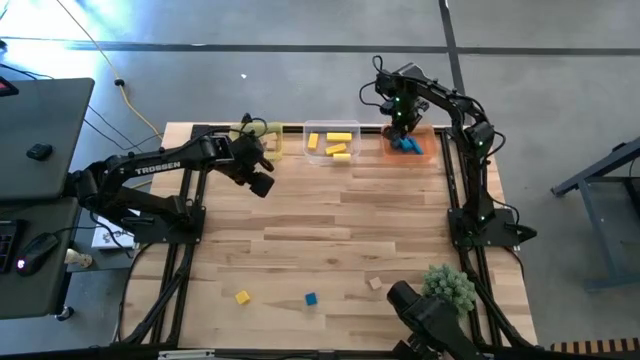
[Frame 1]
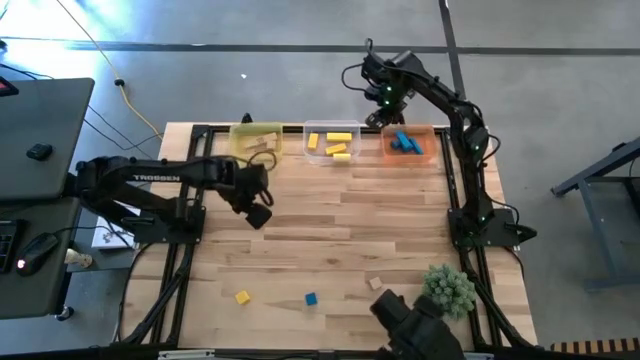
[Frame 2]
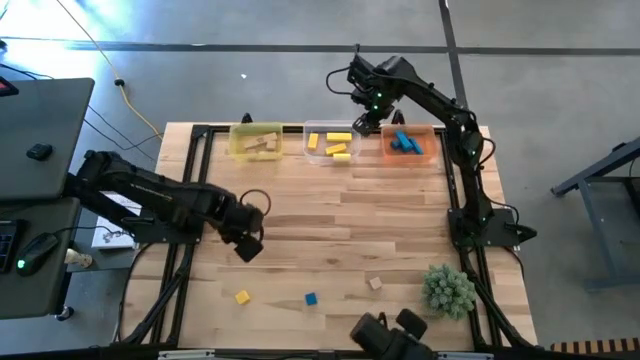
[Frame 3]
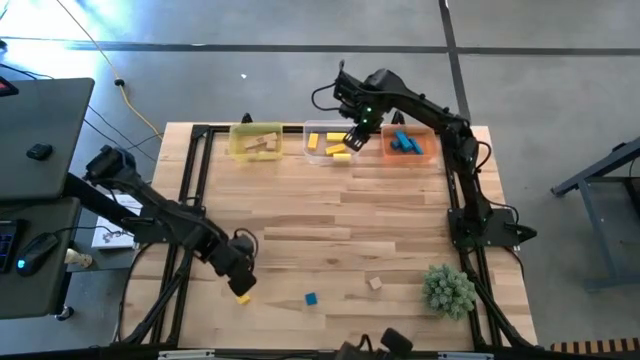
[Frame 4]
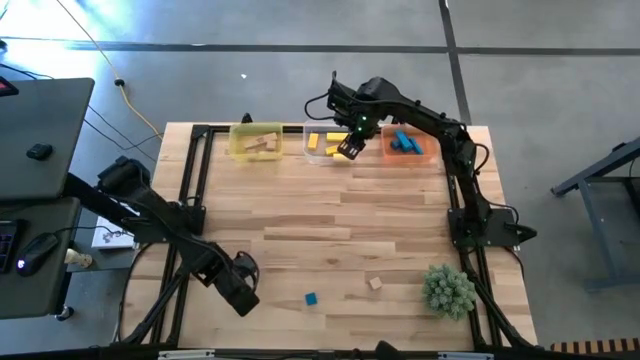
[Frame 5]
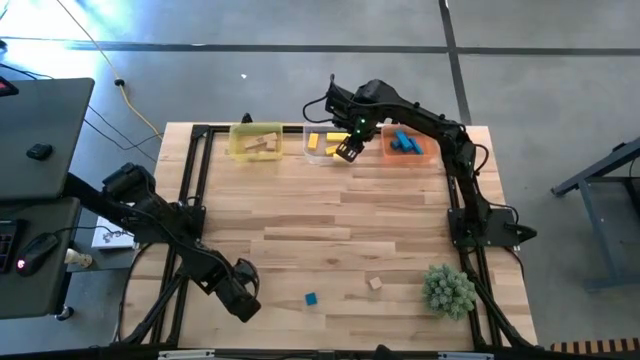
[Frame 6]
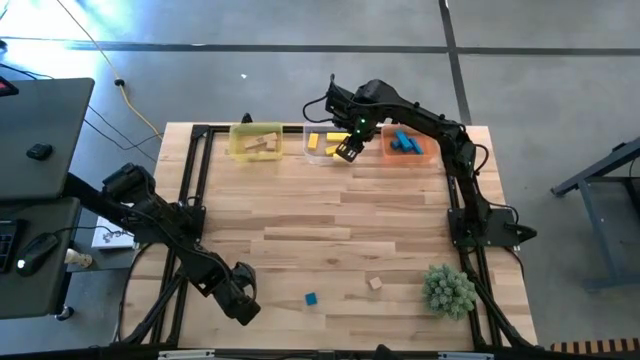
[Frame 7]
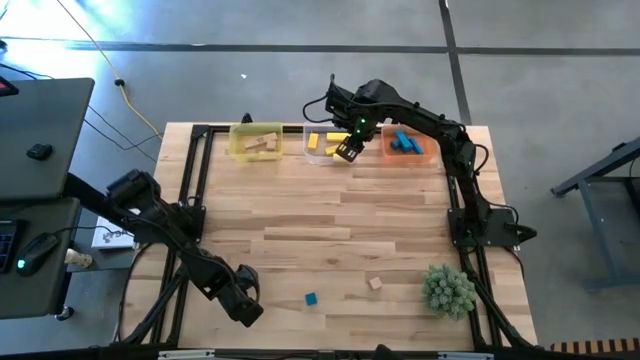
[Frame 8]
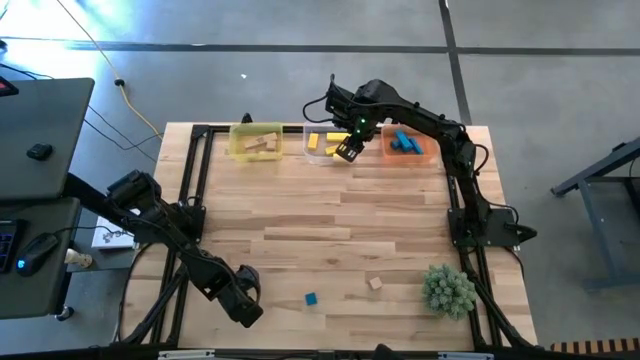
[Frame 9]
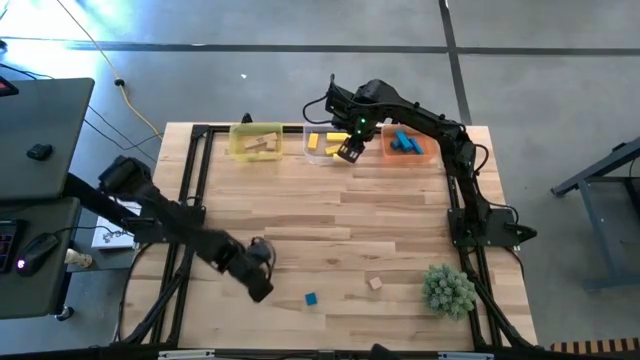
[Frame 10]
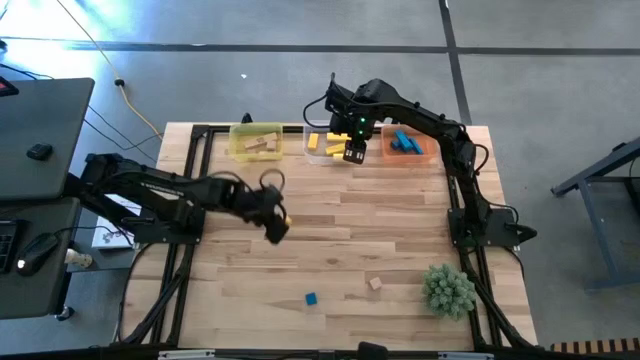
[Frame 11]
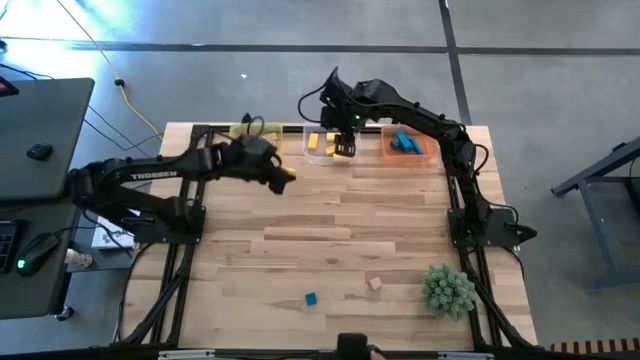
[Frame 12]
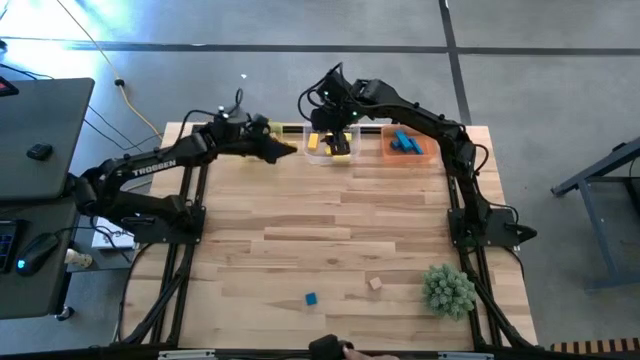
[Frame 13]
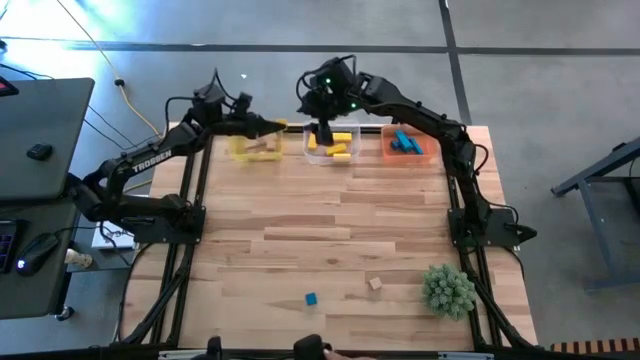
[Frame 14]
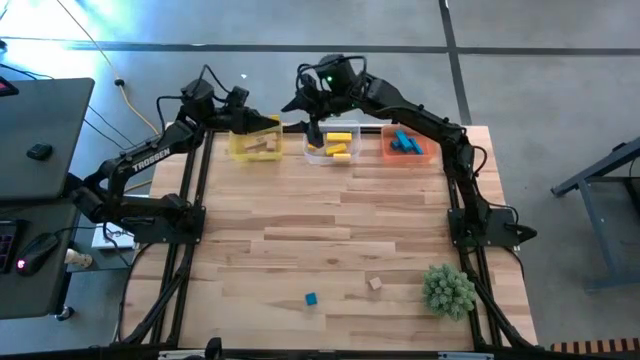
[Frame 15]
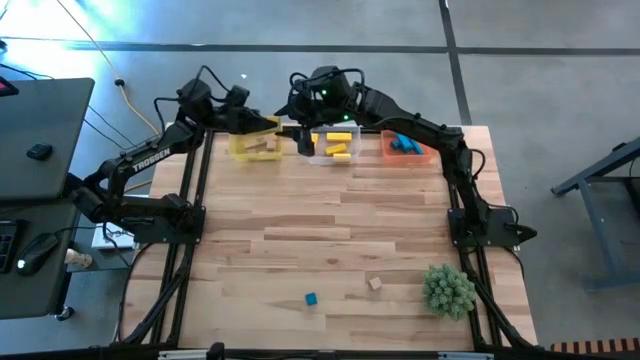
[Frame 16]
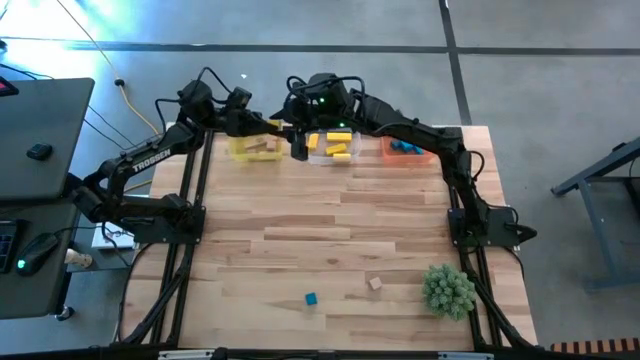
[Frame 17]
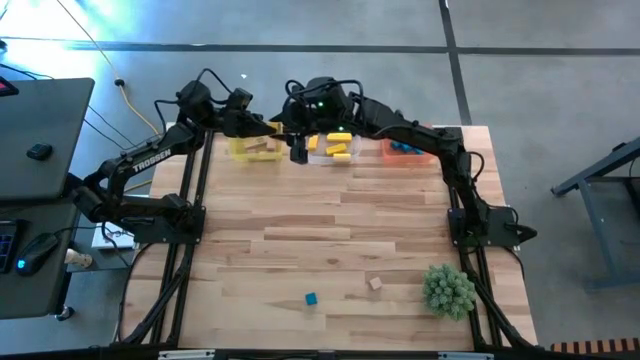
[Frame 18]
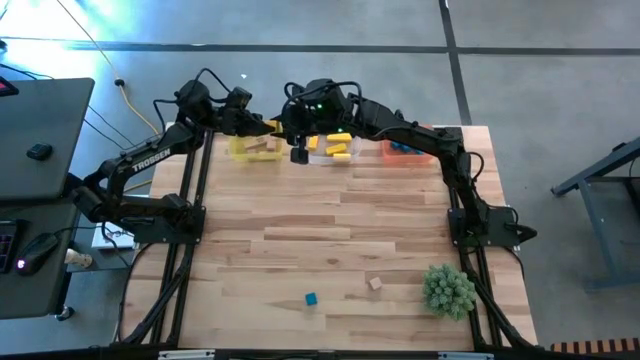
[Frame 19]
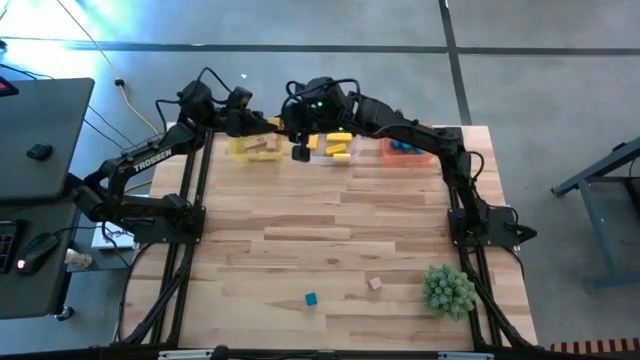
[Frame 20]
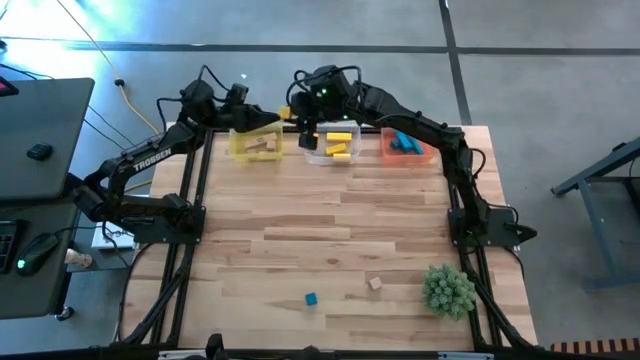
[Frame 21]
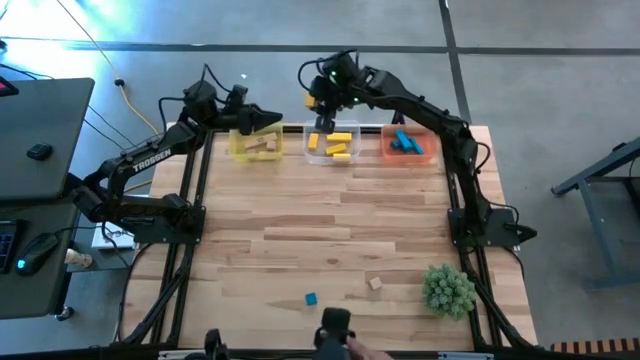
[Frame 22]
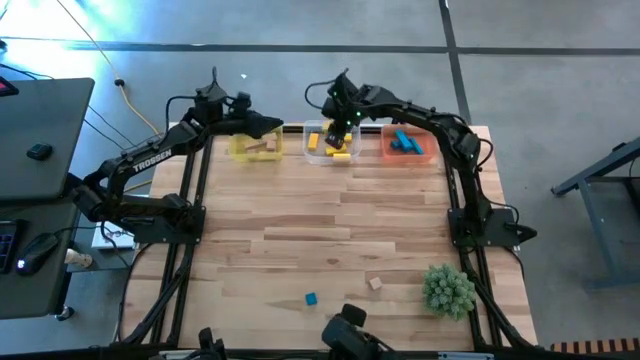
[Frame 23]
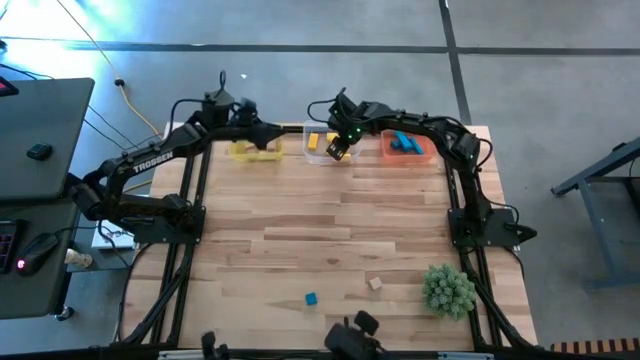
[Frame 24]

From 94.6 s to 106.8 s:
Task: Sort & place blocks by color
Put the yellow block into the transparent bin

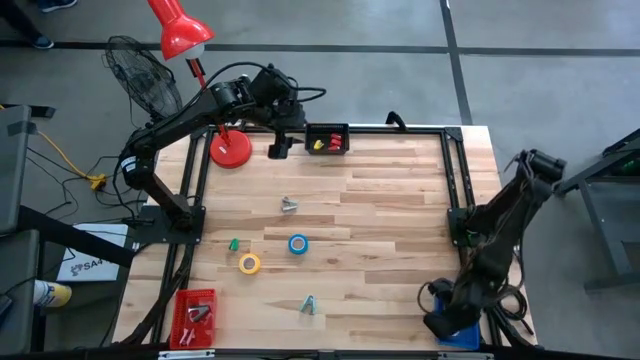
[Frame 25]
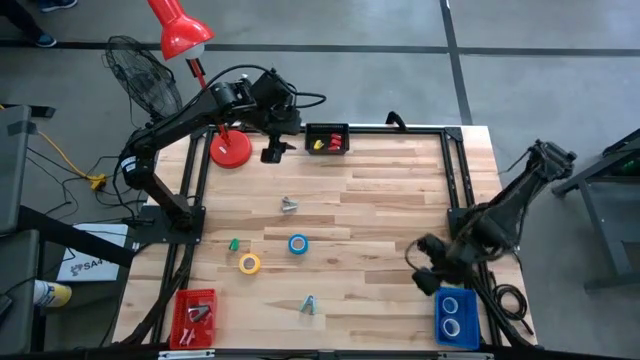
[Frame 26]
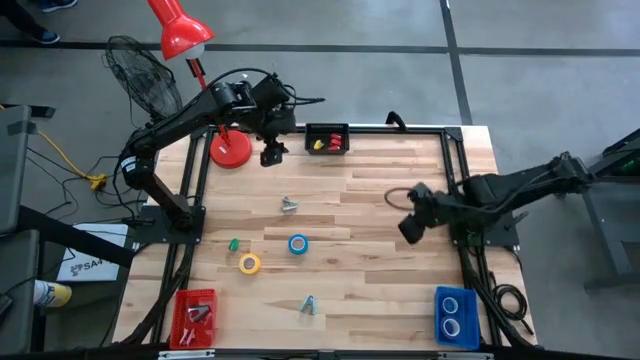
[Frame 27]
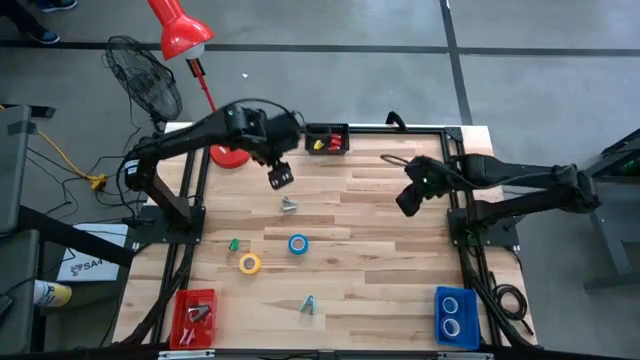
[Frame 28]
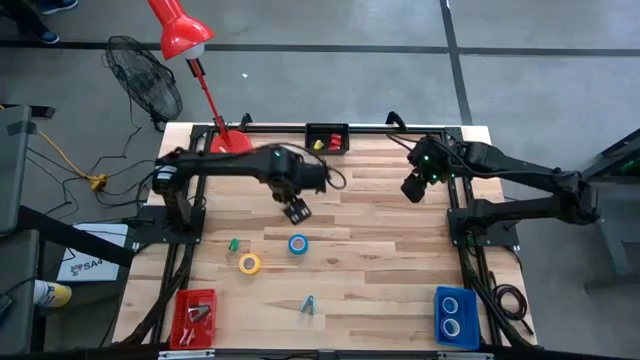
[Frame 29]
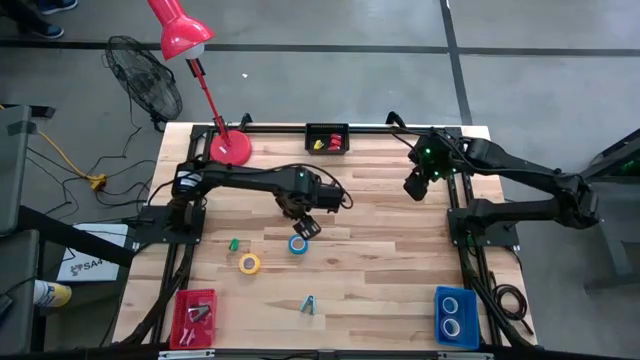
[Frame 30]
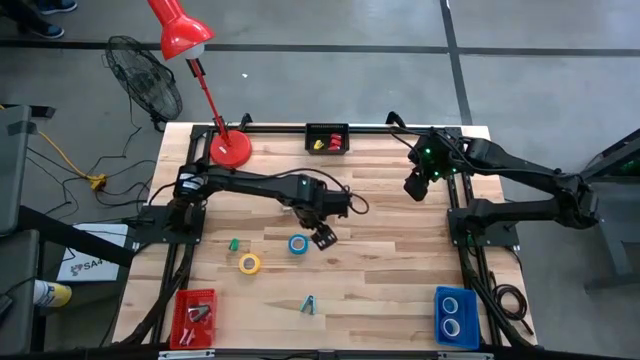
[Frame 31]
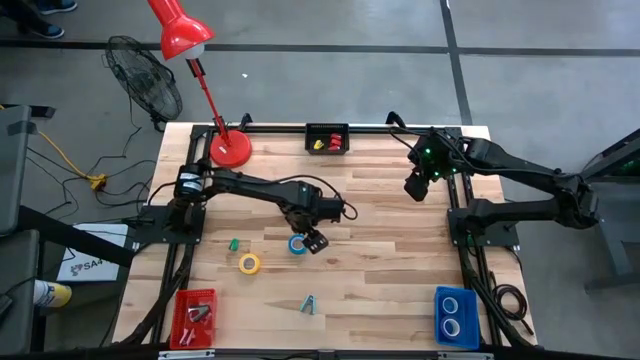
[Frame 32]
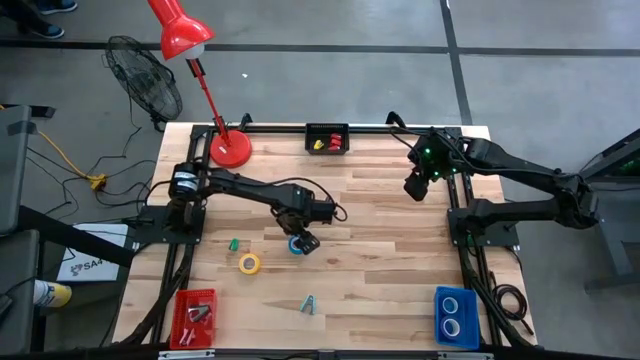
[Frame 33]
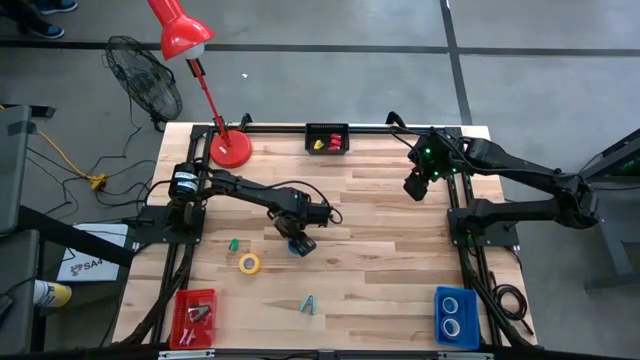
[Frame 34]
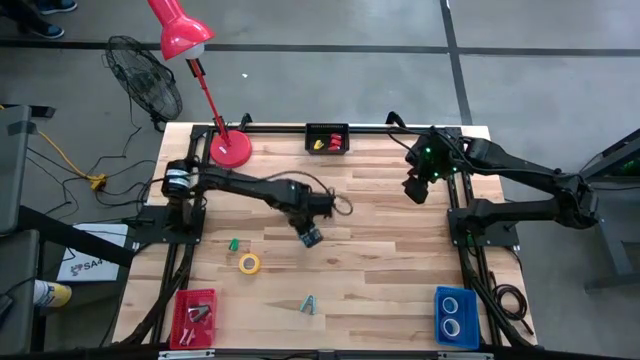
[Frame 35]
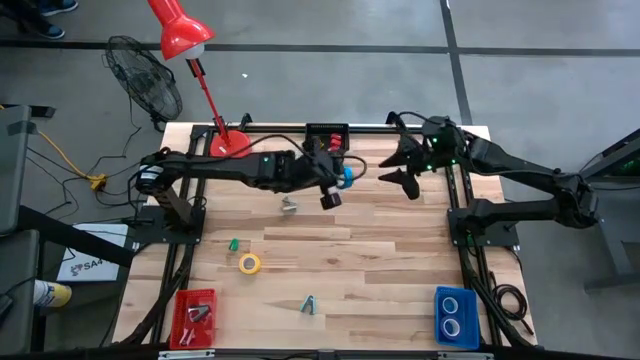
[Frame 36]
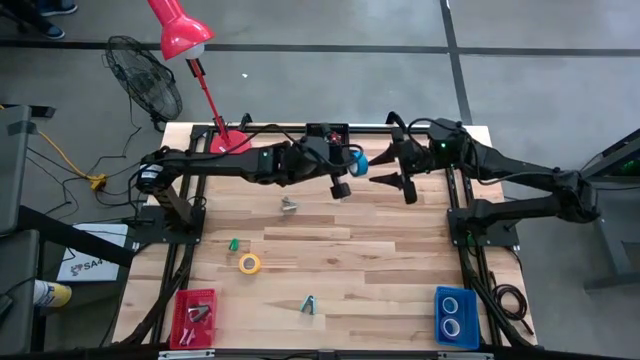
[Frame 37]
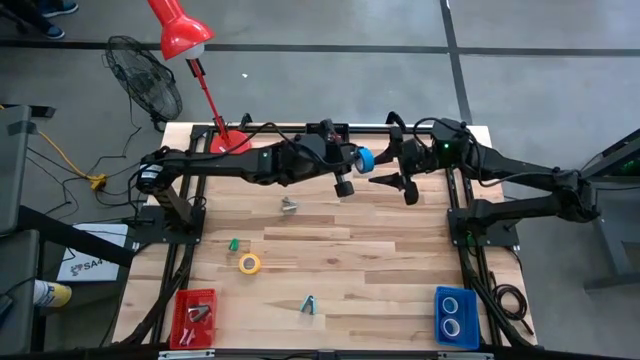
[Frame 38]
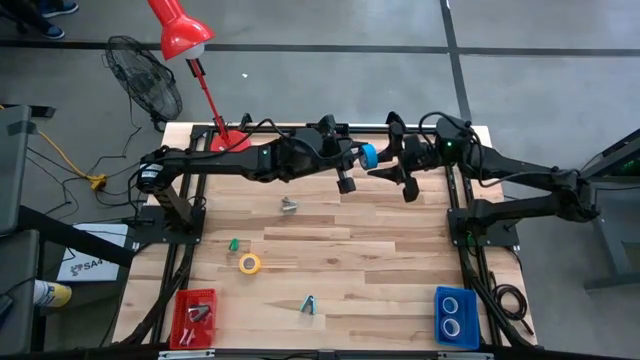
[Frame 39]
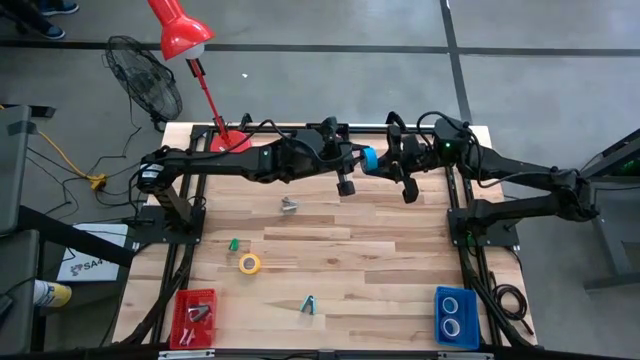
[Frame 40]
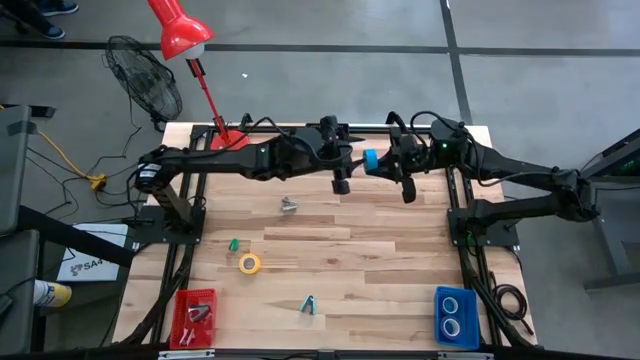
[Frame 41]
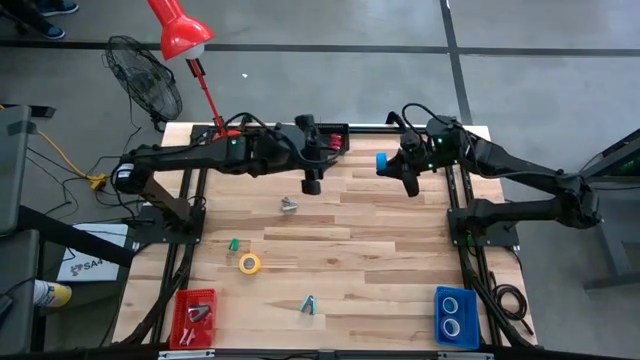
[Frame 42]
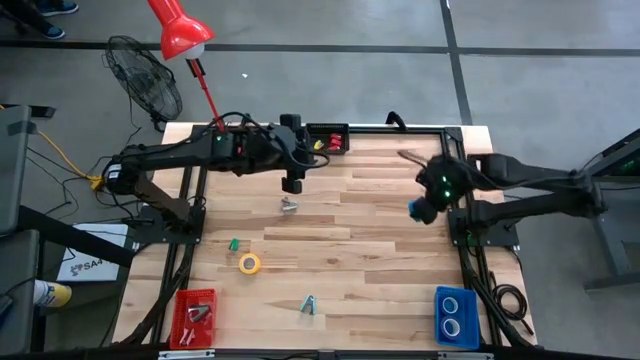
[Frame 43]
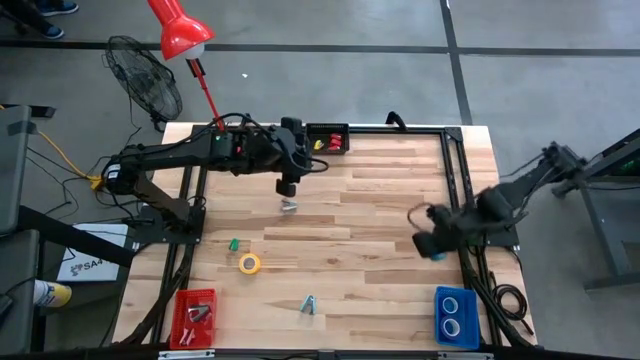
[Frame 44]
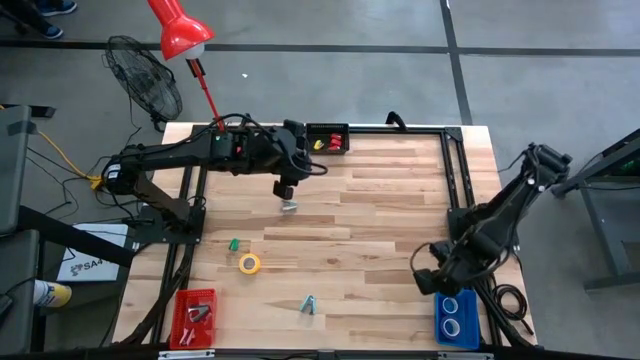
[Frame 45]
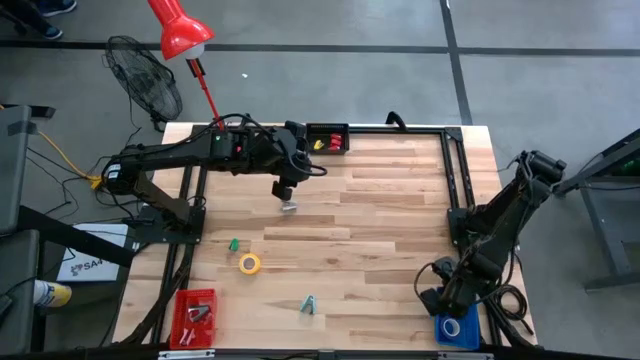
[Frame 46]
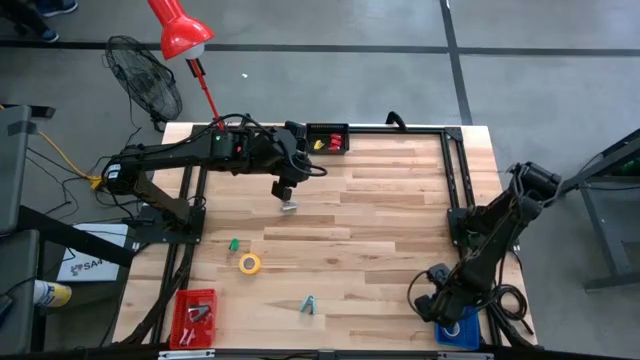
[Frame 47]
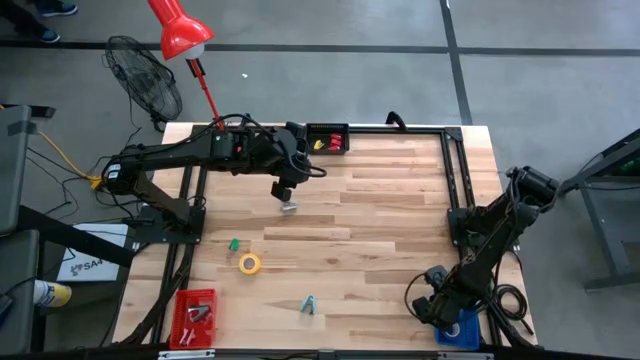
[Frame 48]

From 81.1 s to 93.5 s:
Task: Pick and place Stapler, Stapler remover, tape
Put the blue tape into the green basket
